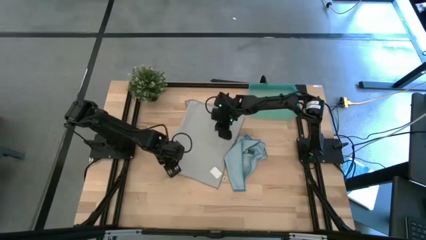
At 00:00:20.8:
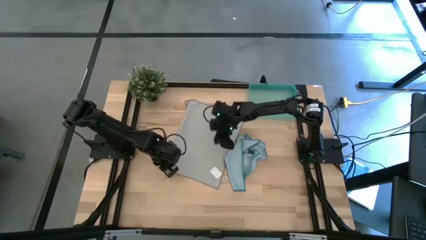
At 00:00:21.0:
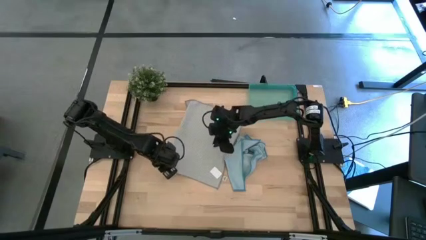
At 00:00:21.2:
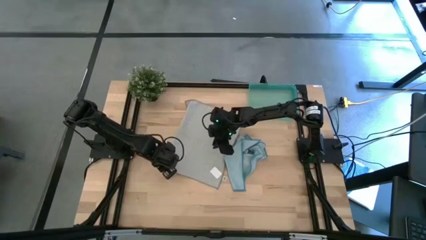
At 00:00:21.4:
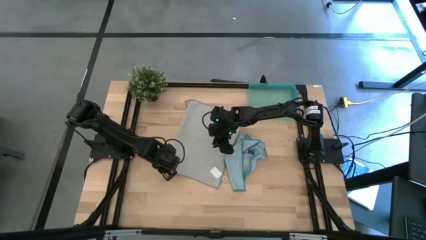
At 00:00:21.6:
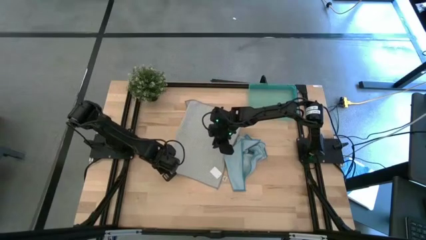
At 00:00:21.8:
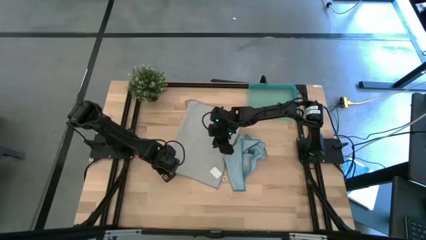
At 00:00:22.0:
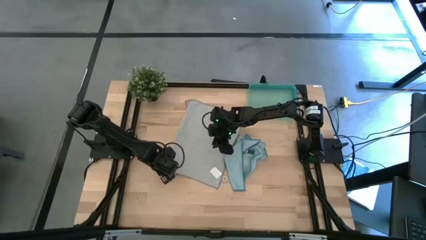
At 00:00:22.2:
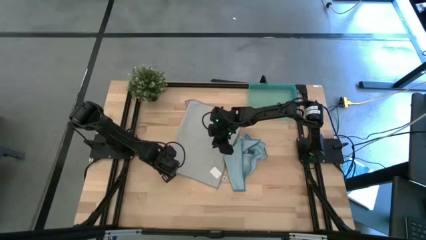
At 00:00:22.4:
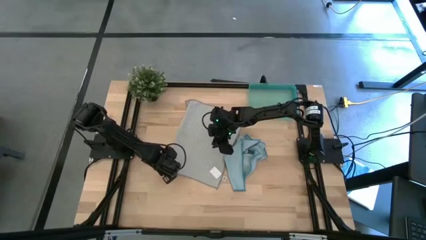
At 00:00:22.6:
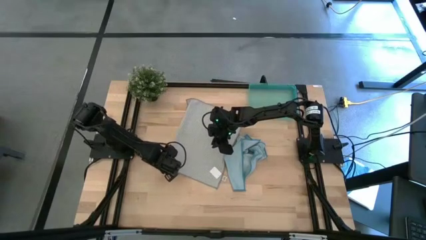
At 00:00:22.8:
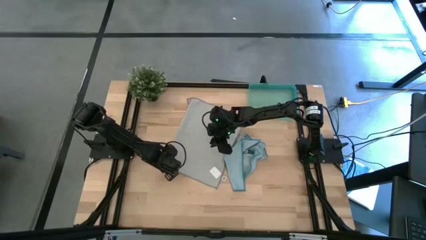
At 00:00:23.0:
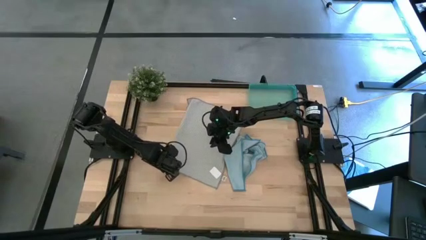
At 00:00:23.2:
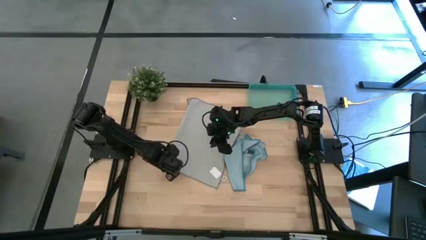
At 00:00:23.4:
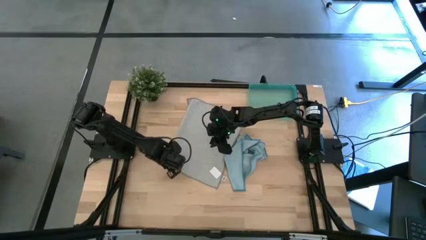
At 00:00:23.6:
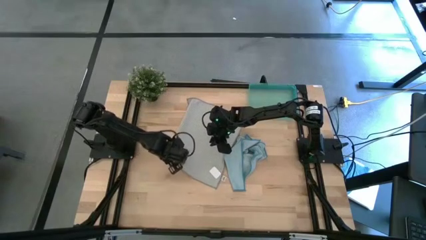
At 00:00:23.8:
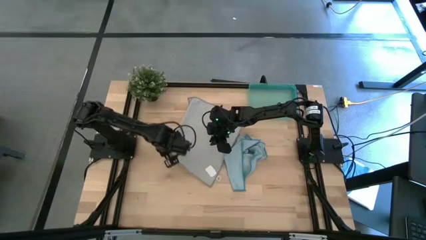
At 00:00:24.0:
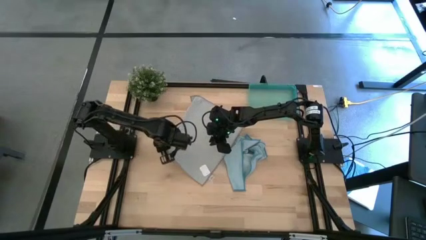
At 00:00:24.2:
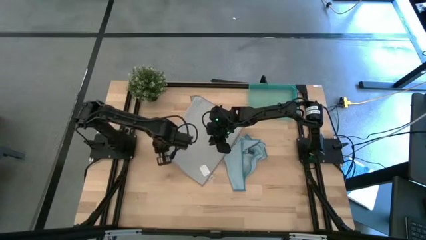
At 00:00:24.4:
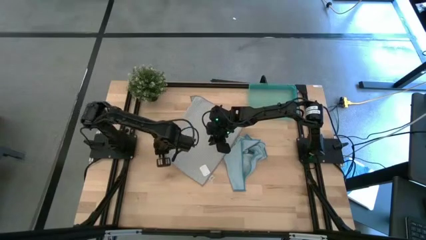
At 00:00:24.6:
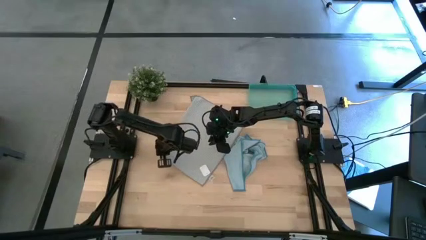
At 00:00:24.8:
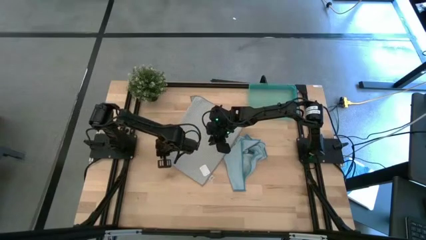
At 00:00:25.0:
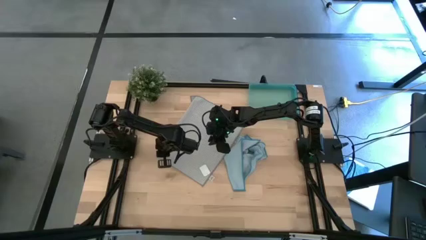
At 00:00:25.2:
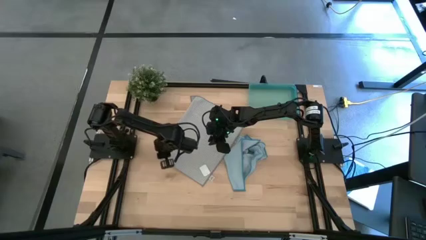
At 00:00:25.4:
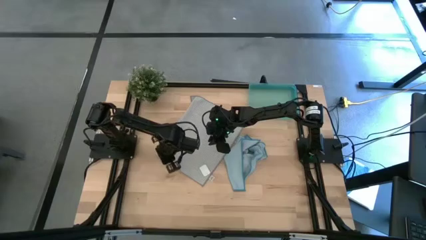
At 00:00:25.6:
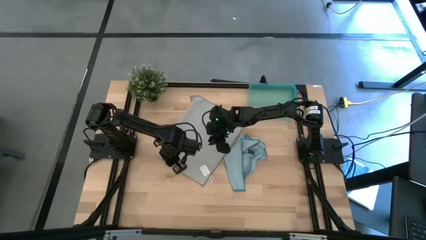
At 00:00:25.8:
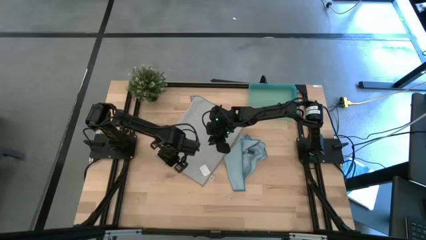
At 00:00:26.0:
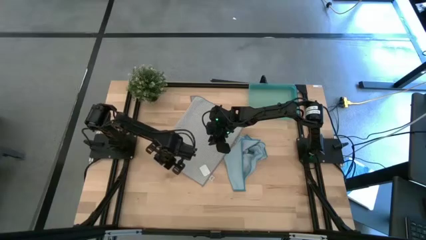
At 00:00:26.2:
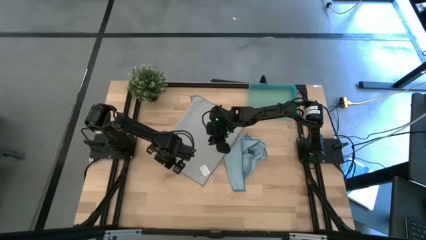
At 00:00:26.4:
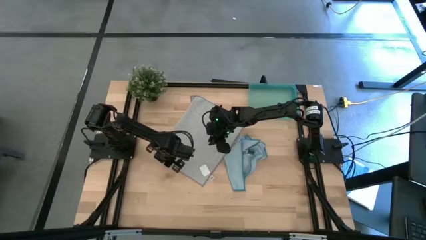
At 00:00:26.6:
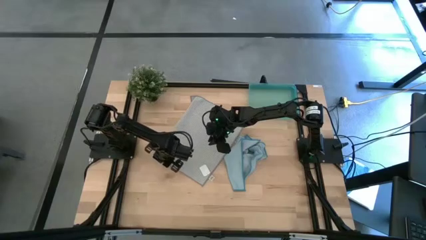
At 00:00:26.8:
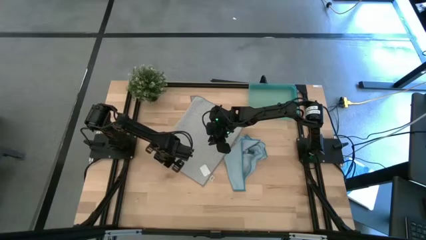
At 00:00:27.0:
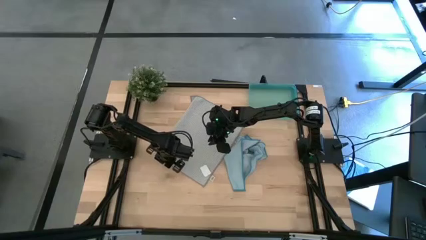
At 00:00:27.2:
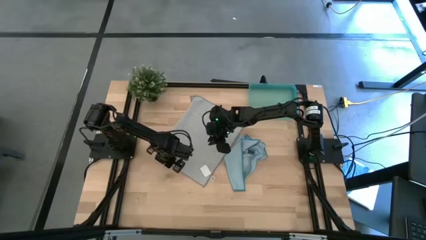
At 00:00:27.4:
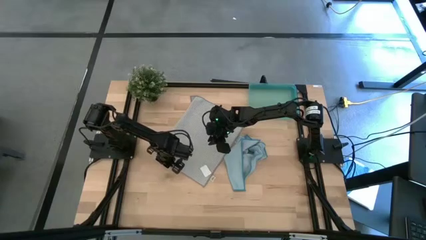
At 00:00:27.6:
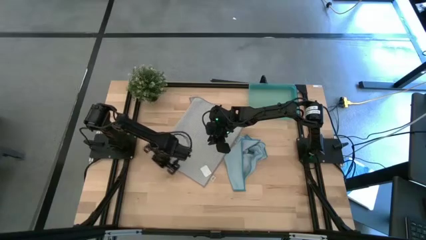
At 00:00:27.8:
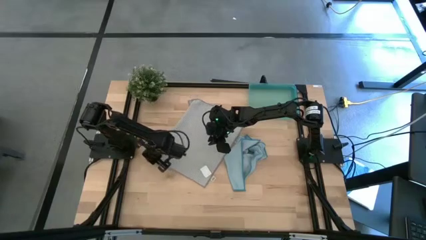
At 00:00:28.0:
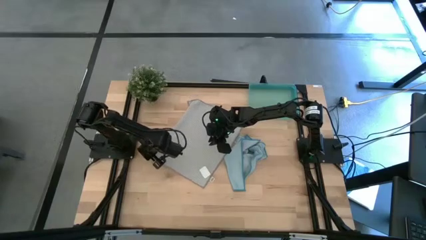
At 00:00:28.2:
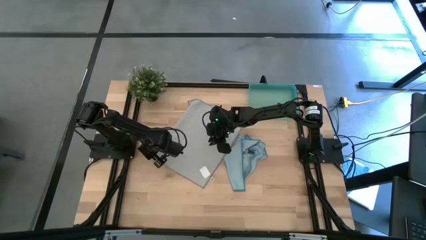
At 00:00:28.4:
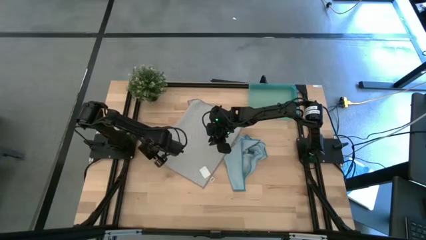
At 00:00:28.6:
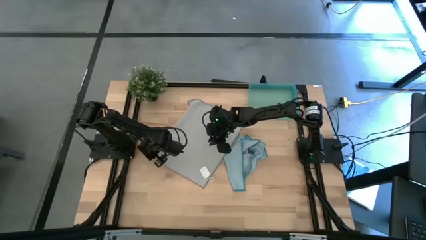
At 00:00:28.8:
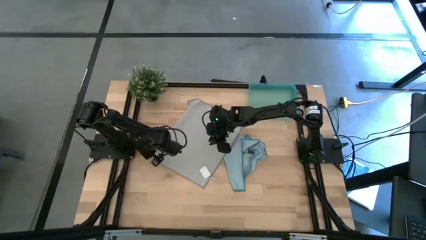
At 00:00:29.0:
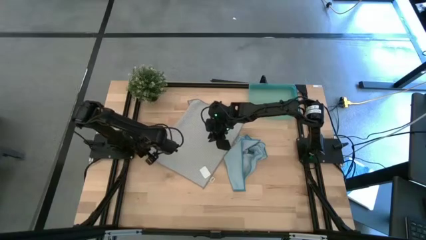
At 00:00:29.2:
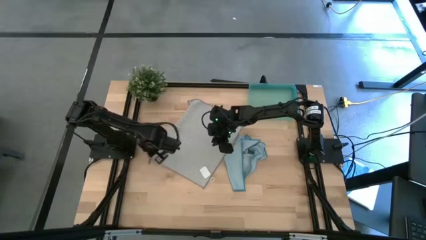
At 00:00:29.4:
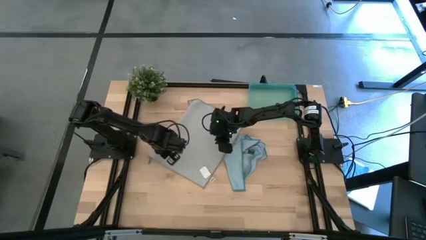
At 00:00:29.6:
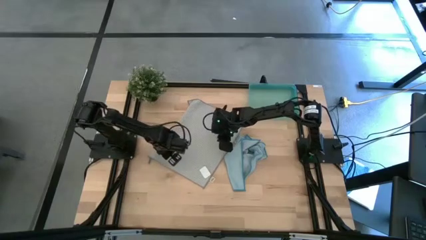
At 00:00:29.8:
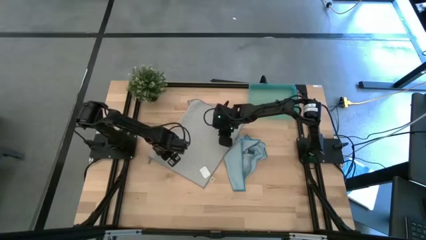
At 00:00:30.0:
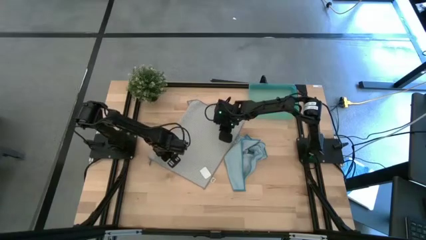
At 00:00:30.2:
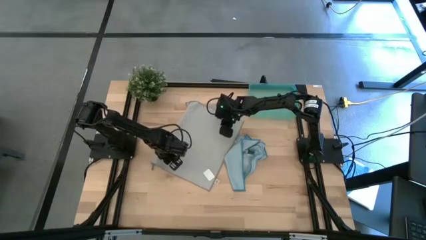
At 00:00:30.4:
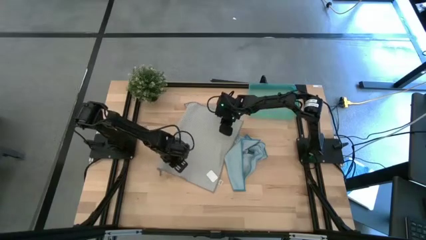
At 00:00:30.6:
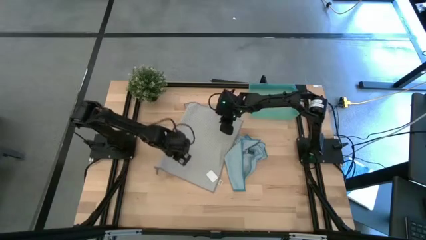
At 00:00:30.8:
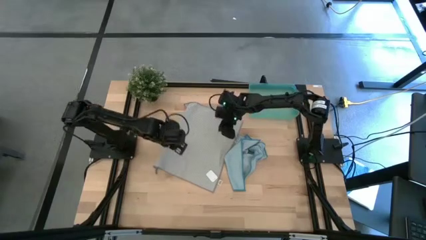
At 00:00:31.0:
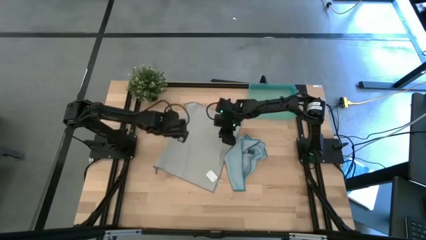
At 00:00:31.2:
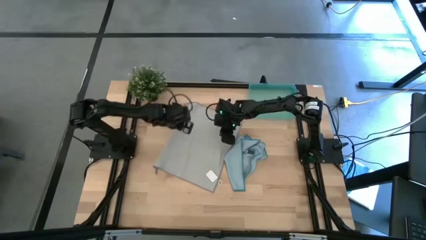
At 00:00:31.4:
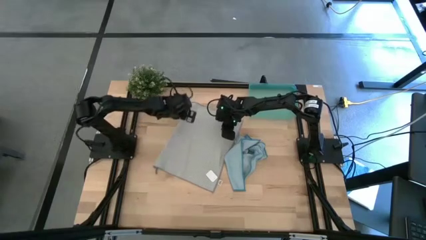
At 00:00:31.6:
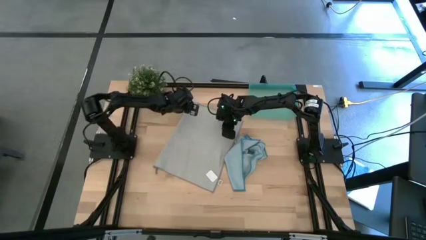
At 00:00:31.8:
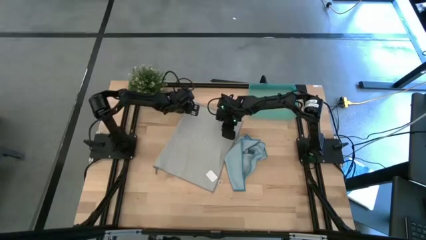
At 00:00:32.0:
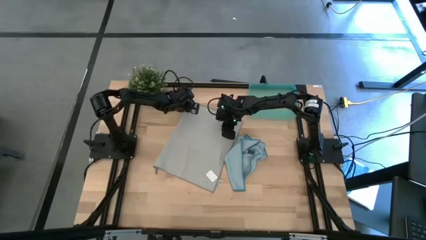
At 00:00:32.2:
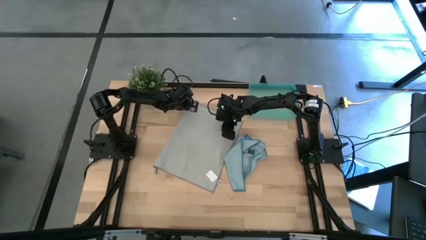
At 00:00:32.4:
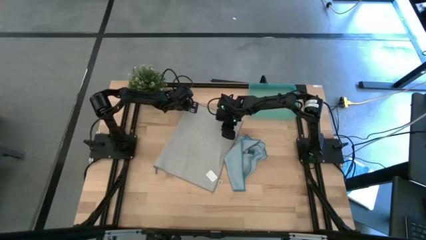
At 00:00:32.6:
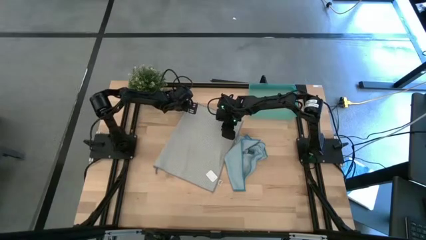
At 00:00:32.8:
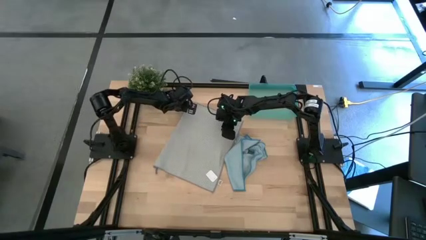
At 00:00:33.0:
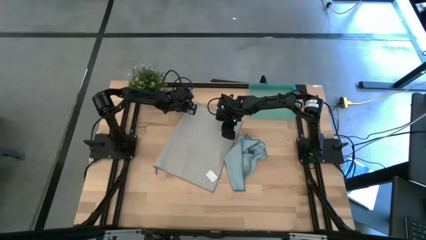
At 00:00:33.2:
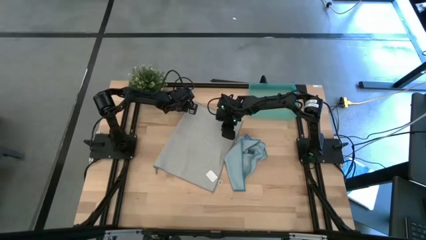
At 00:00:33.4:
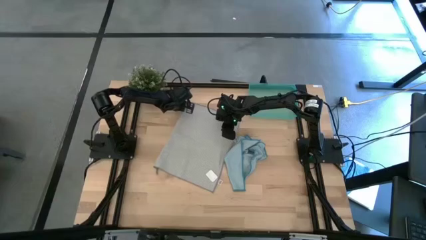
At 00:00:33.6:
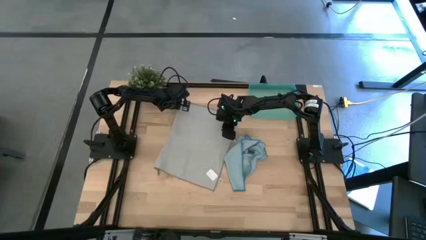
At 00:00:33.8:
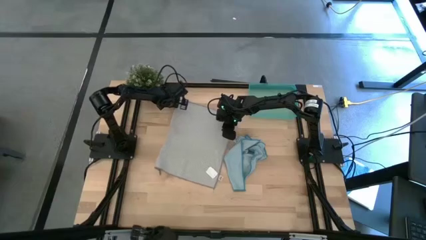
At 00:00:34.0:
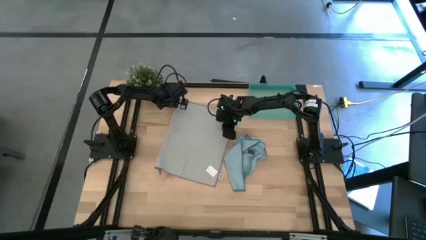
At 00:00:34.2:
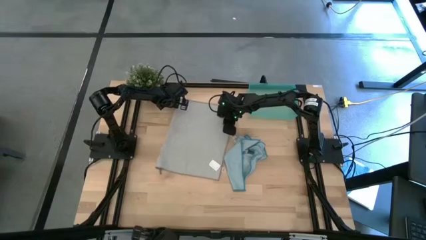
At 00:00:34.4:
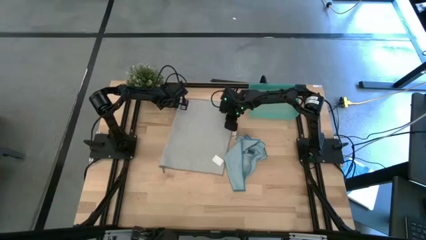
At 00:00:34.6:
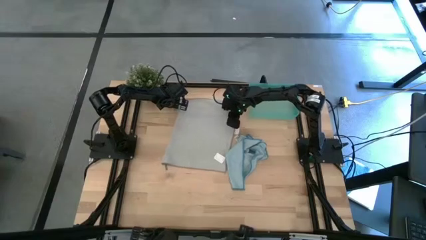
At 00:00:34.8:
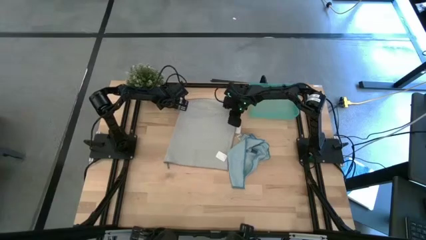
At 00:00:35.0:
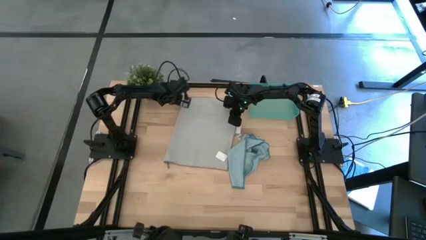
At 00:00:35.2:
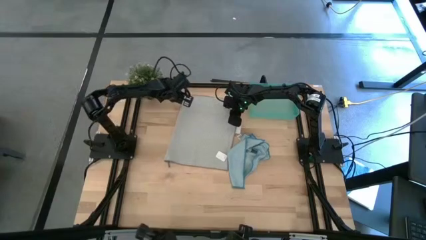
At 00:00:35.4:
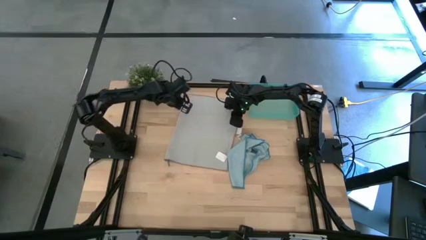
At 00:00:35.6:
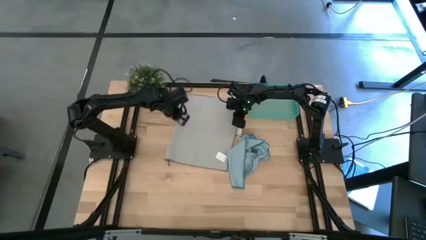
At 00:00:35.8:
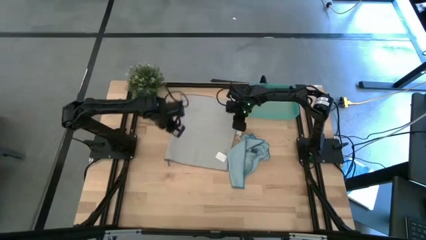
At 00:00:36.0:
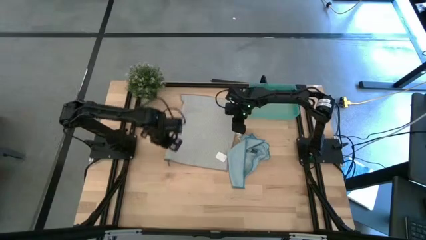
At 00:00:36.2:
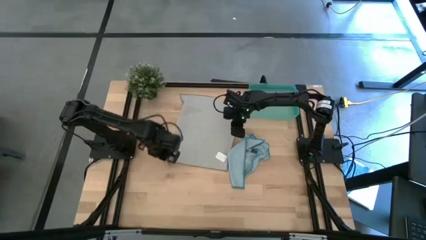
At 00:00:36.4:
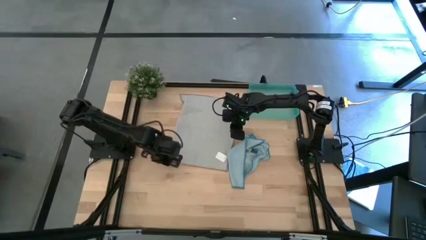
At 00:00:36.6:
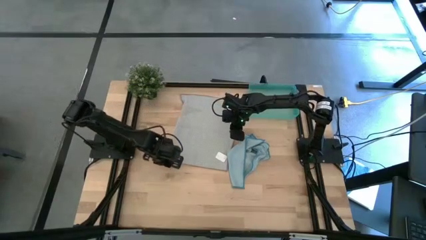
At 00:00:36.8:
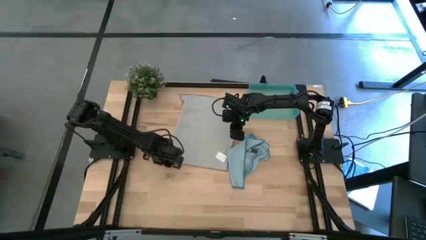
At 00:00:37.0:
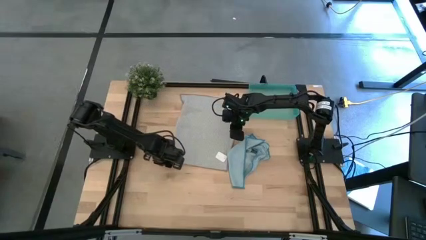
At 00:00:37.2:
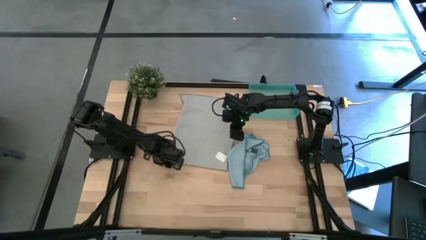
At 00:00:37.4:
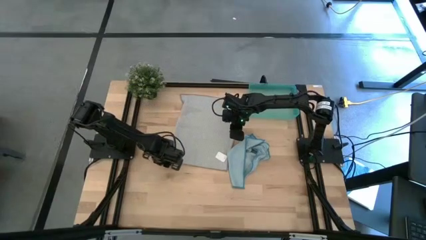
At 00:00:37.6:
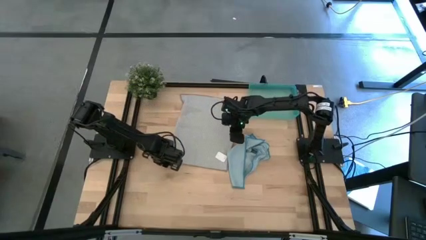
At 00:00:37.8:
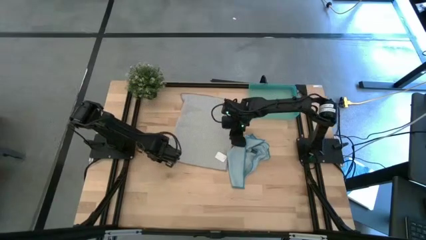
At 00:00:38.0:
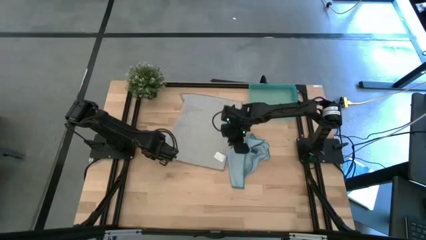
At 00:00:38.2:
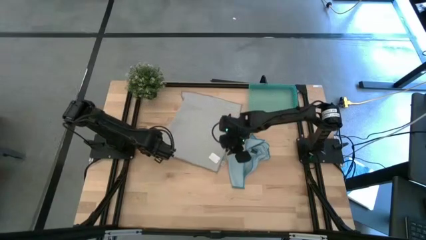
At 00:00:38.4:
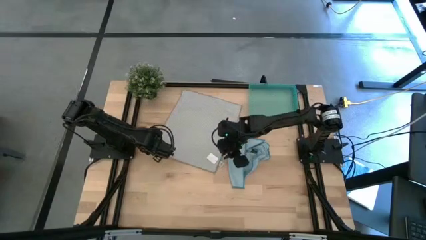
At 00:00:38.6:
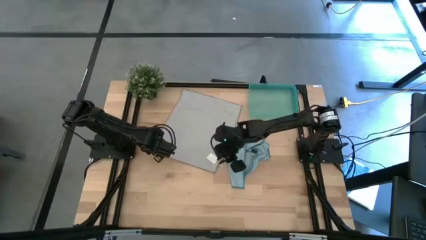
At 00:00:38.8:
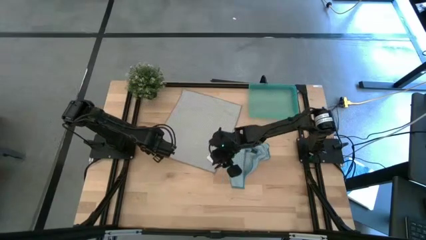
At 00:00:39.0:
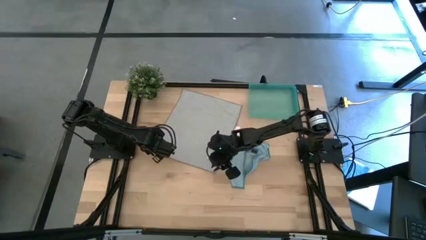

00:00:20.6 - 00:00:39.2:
Task: Roll microfiber towels into tight, uniform cylinder then place into a basket
Roll the grey microfiber towel
